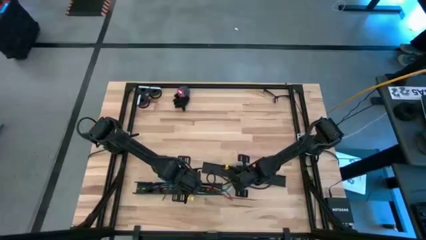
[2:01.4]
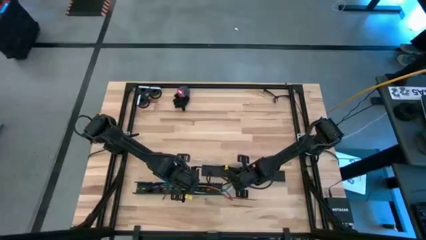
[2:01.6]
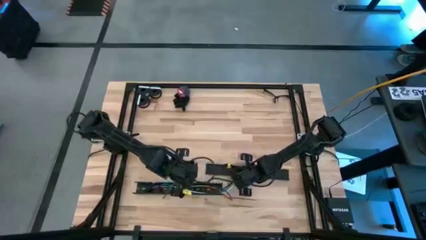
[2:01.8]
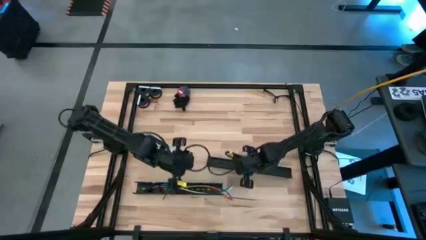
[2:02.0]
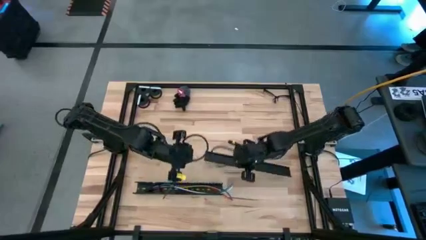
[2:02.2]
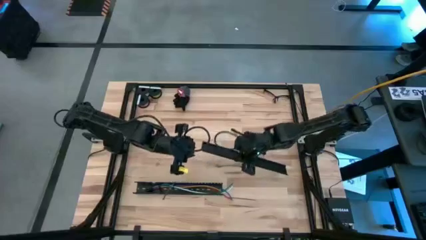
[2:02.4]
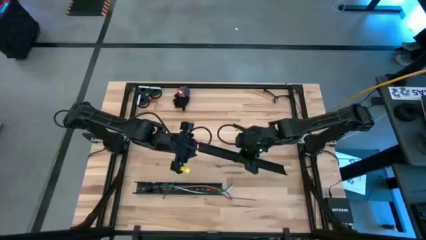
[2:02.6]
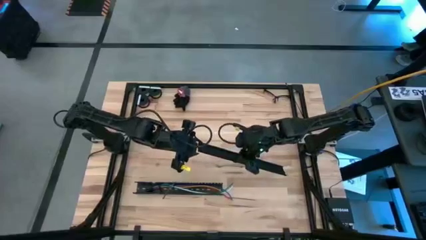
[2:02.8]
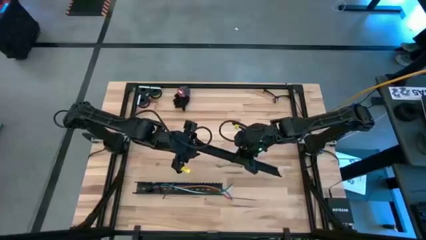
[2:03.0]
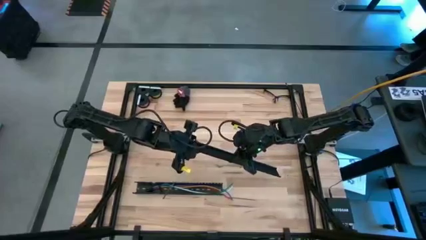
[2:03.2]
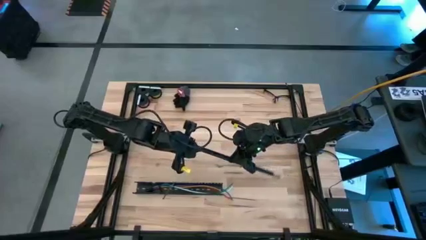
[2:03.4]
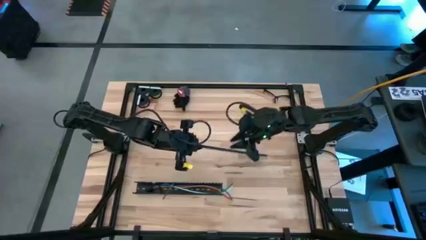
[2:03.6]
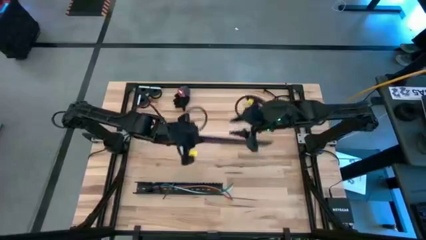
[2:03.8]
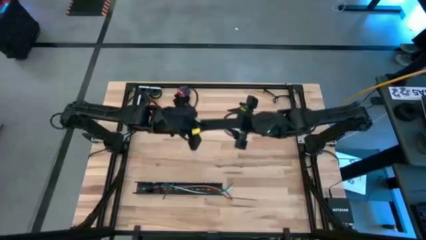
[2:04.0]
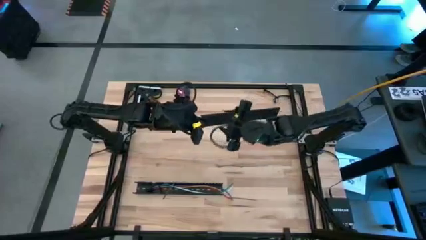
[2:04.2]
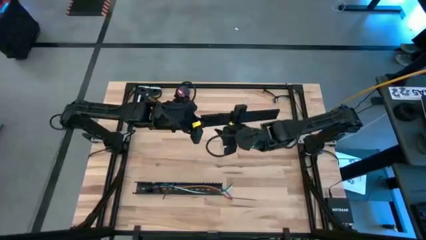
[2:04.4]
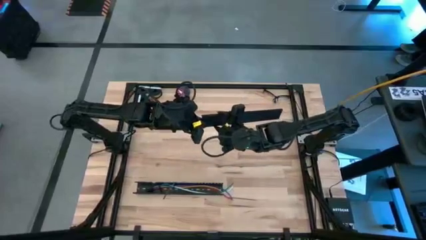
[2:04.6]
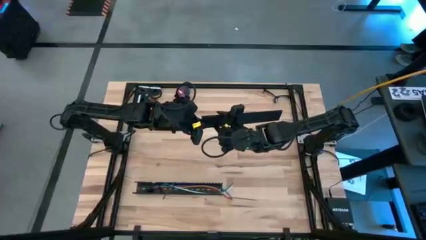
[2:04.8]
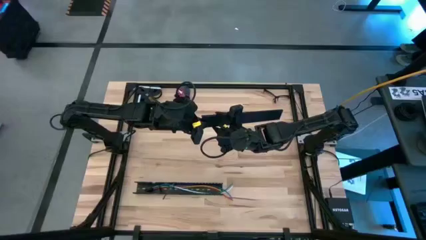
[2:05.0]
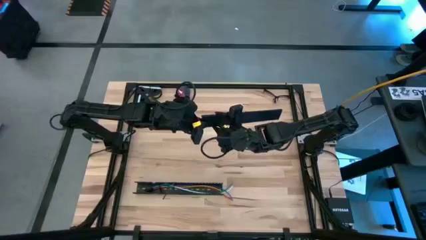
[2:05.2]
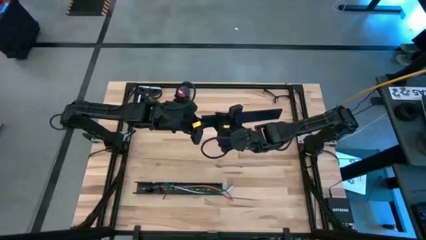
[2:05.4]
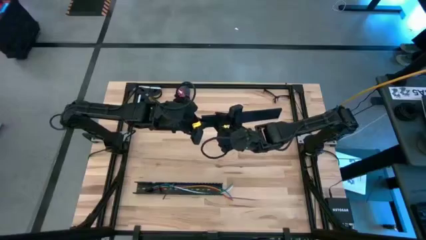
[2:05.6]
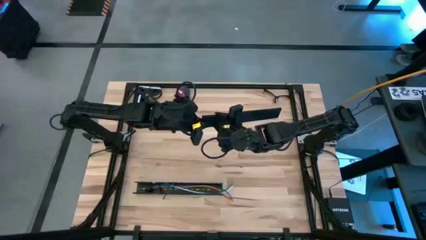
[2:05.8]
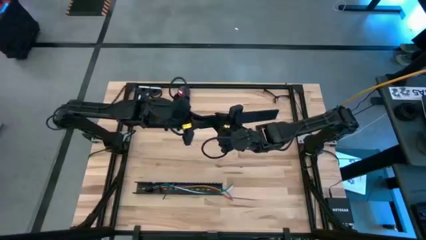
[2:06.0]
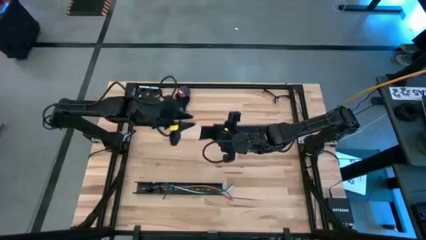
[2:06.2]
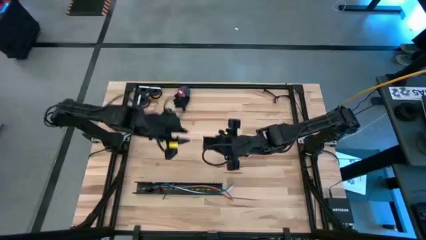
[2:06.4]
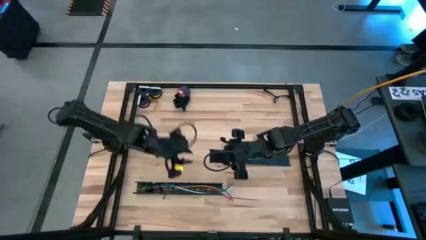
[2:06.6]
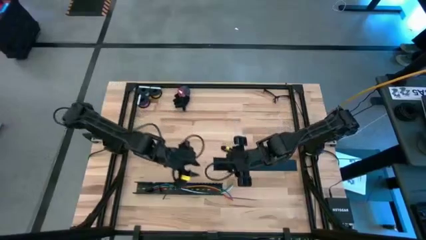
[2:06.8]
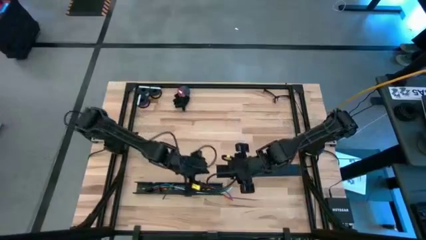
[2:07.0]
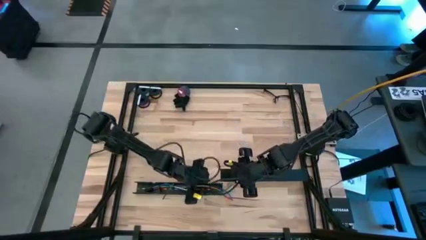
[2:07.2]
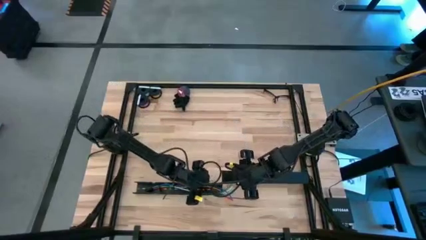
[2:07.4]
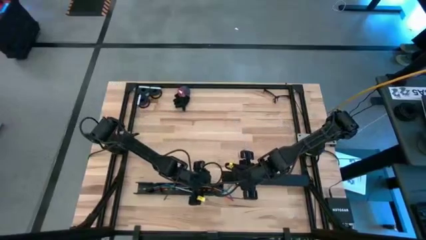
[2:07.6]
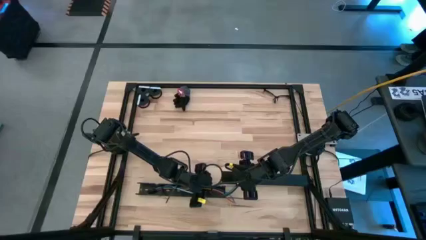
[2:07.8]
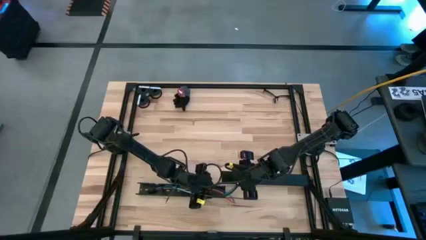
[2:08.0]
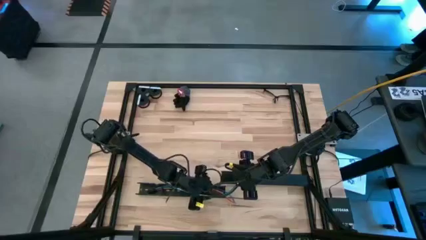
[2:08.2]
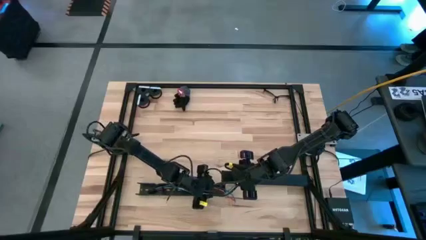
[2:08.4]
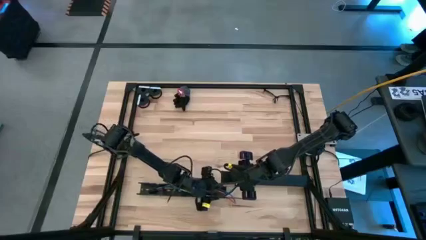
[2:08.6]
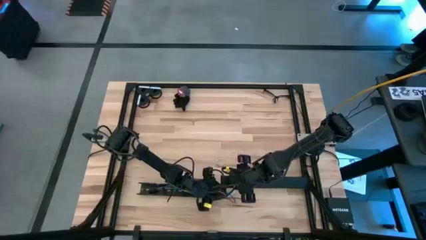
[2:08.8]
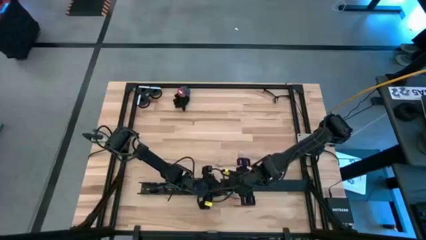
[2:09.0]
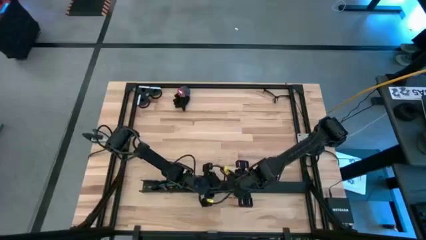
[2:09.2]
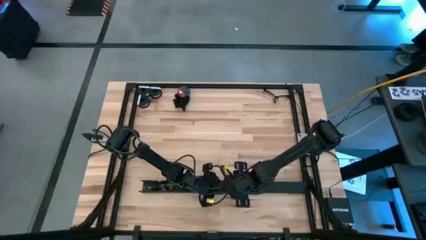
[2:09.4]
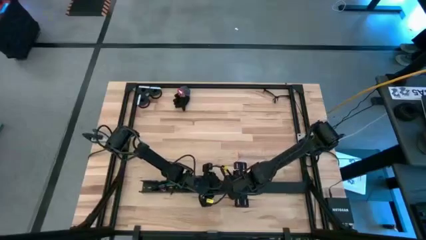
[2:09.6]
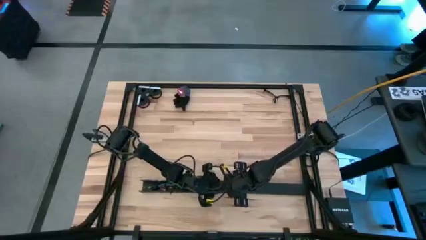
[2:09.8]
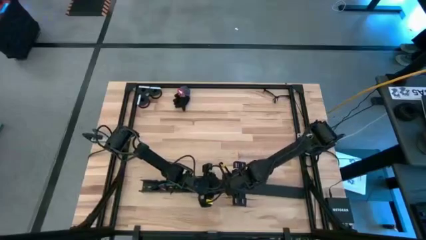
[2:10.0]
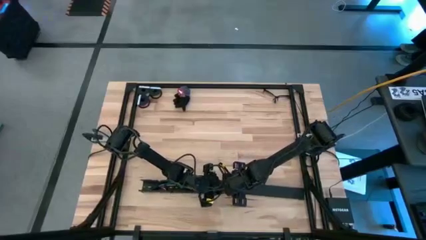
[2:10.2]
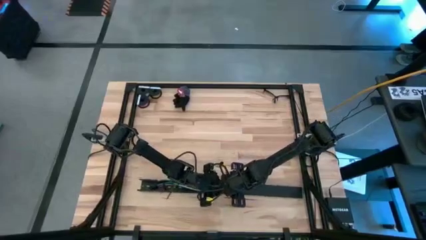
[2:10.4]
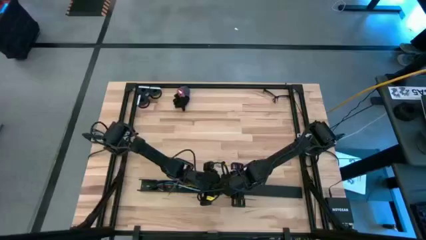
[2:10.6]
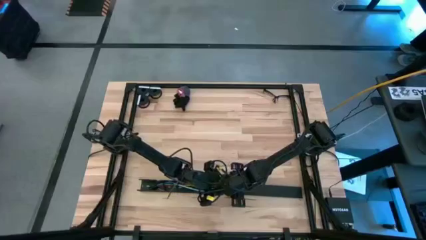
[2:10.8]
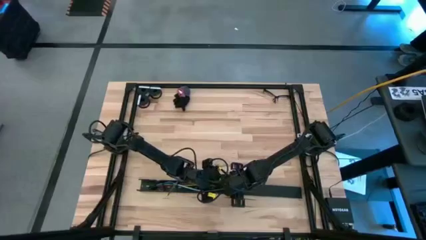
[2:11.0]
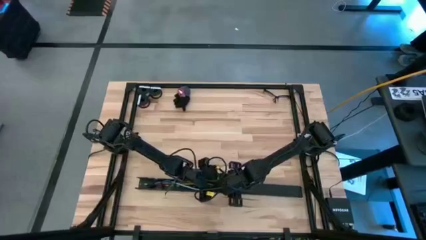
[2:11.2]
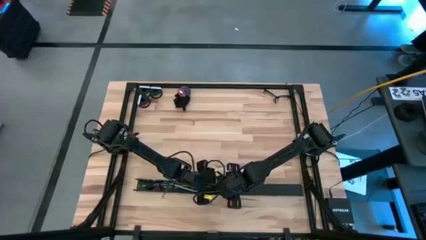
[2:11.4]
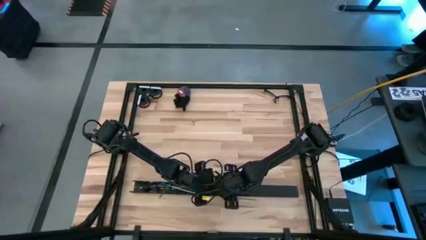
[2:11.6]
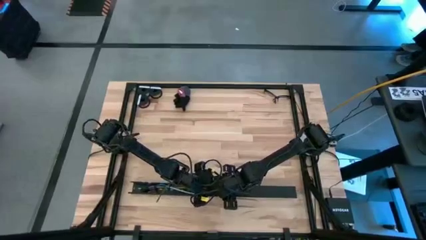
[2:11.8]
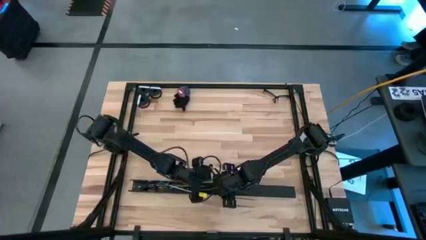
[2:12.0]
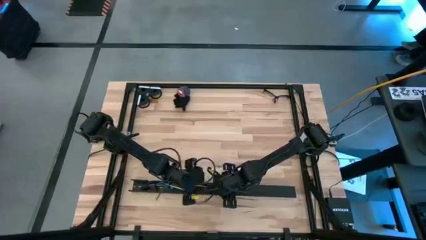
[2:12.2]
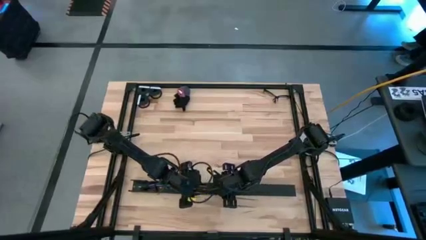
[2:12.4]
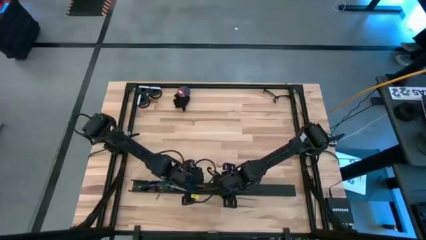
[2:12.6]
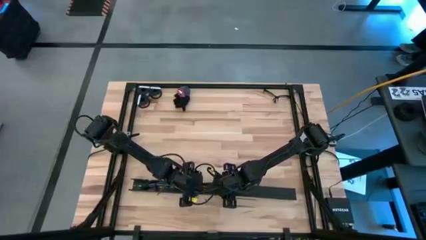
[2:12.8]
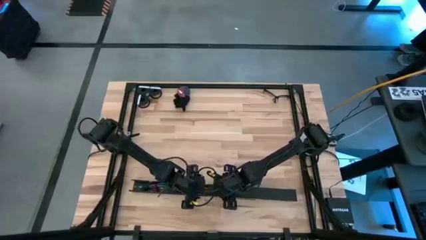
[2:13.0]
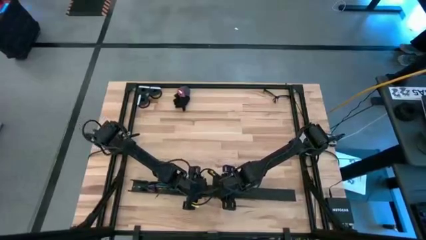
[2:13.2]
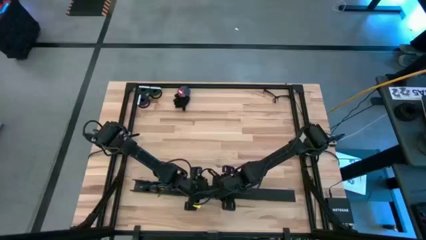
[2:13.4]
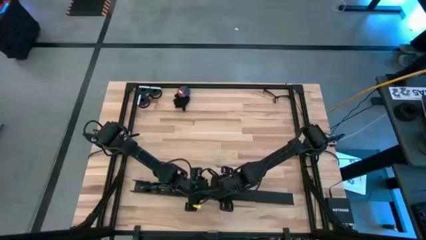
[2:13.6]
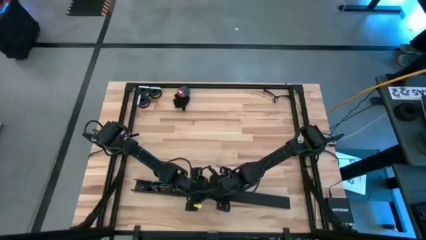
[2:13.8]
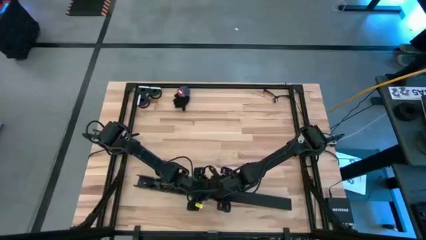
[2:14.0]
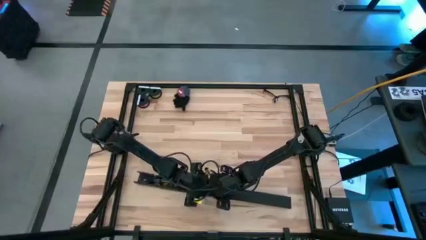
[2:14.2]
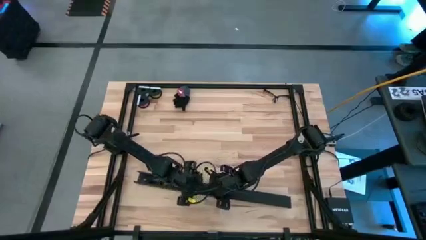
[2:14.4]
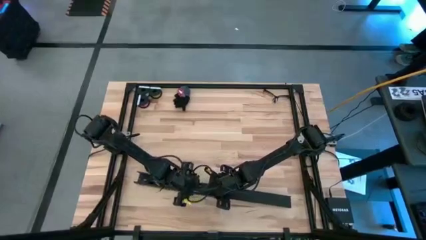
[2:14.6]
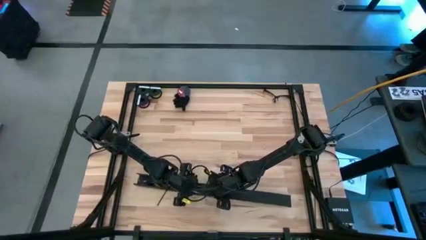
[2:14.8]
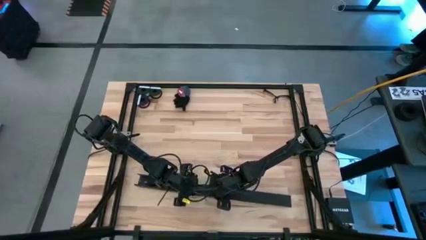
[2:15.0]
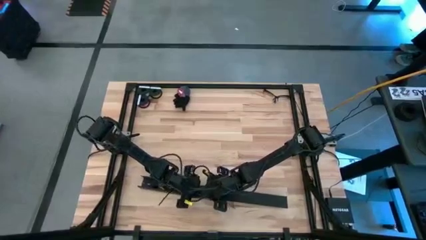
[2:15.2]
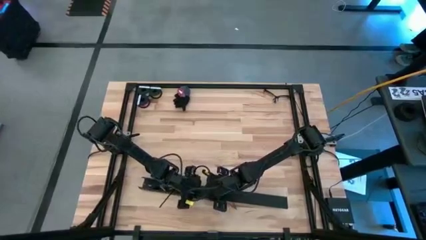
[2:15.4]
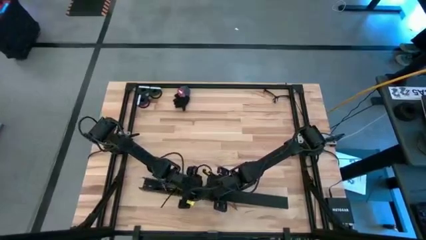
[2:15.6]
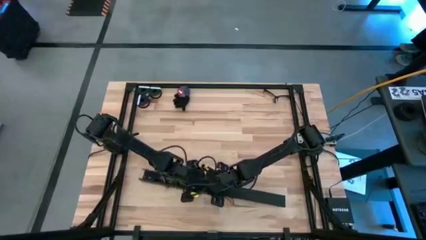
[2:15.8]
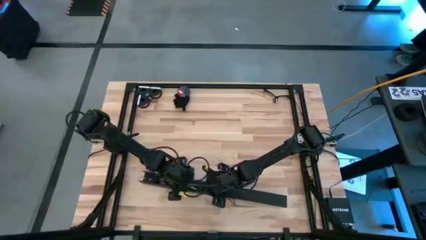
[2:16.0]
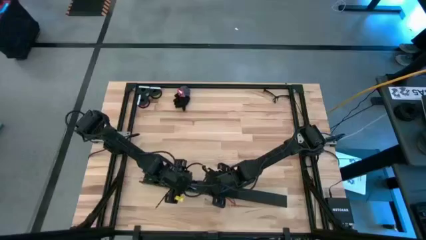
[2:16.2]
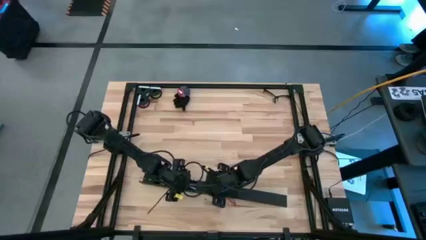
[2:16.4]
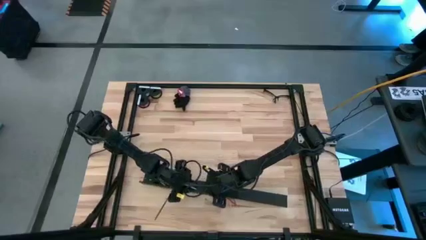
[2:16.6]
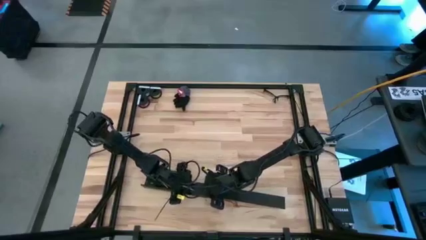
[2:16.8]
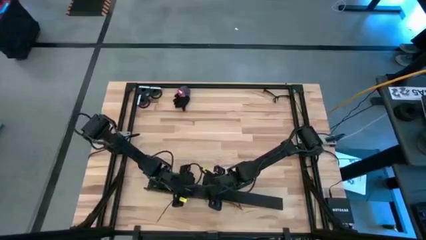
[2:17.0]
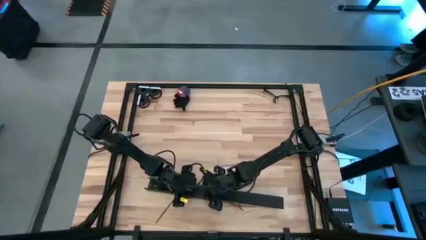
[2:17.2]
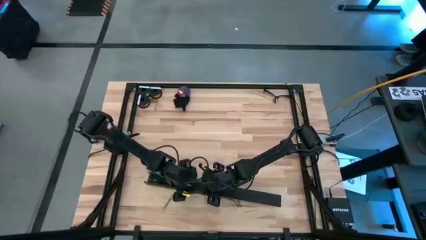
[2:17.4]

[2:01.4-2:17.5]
Task: Ziptie cables
Close the black cable duct
